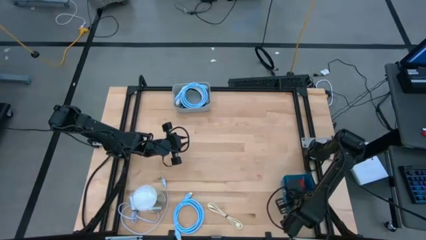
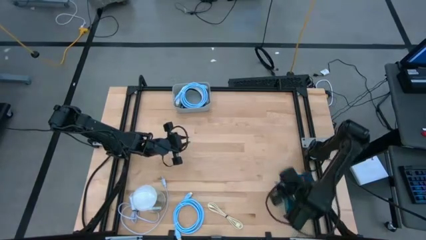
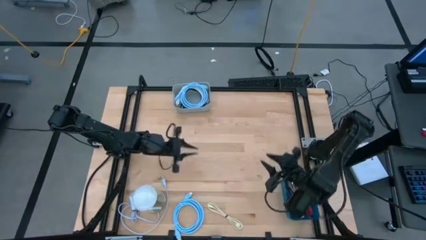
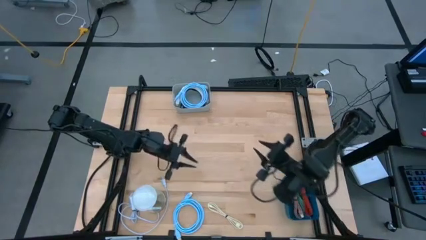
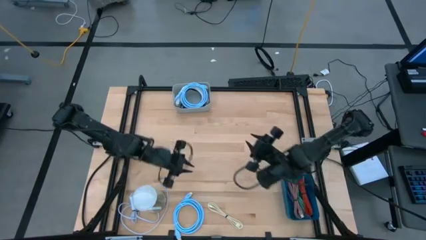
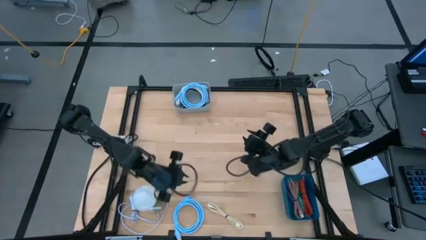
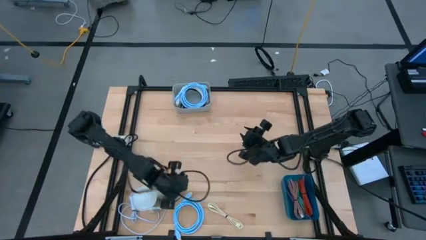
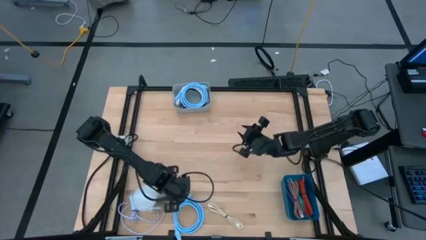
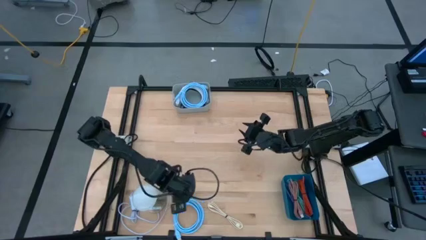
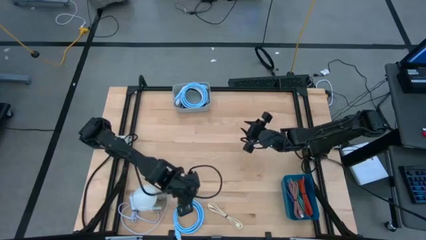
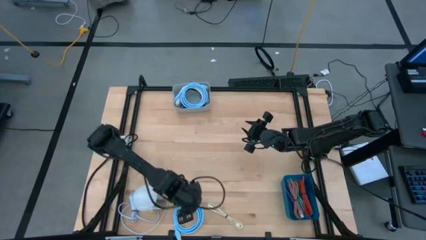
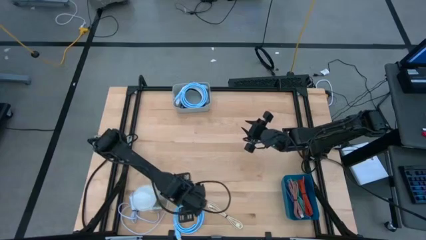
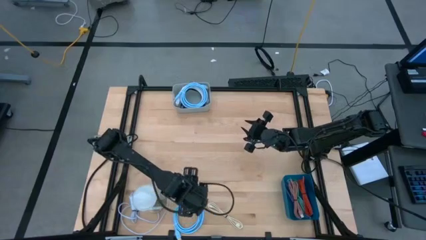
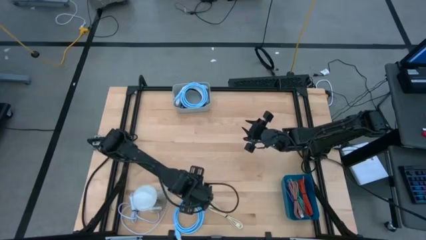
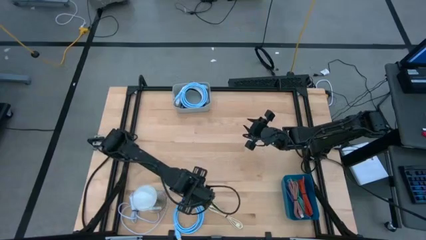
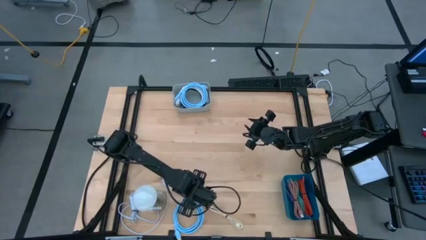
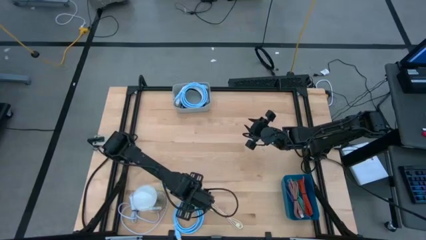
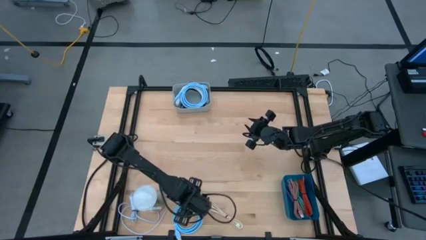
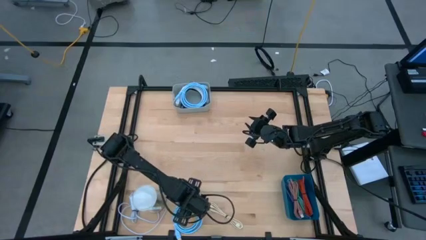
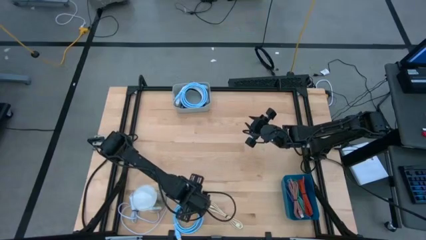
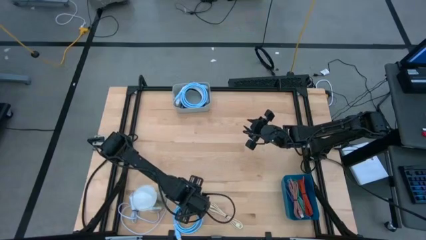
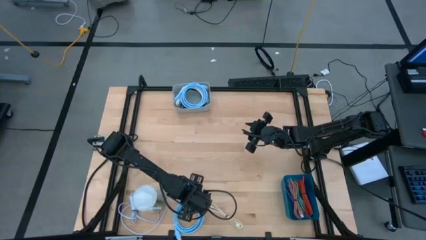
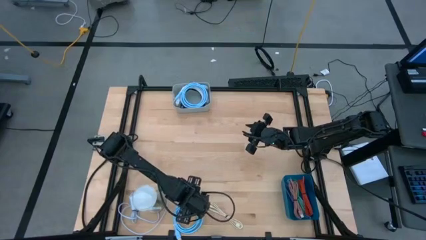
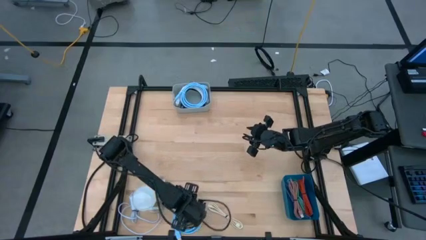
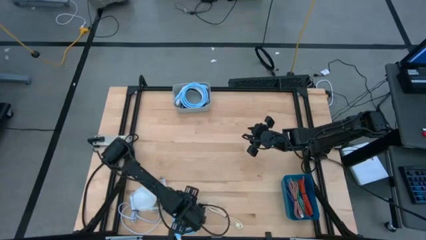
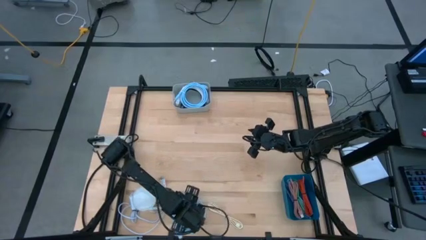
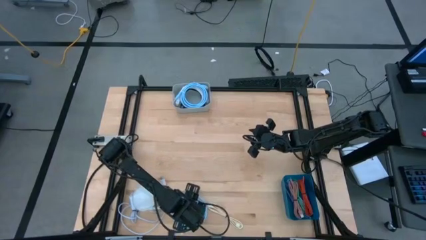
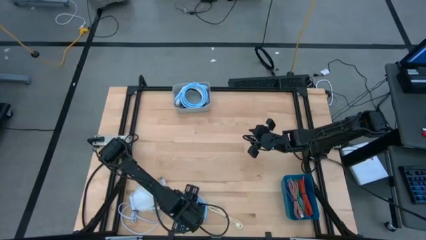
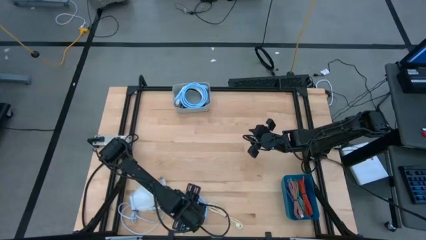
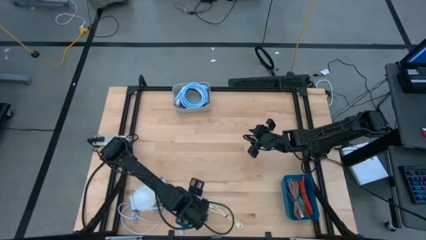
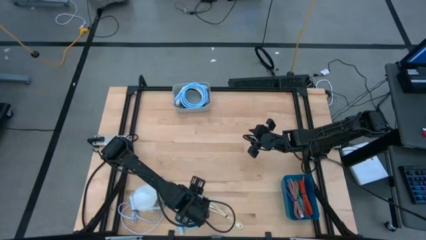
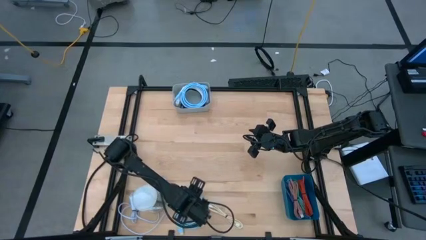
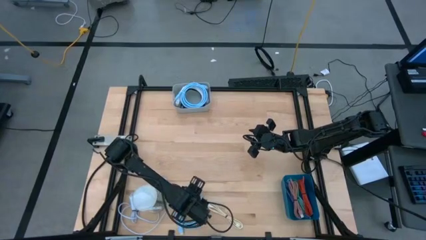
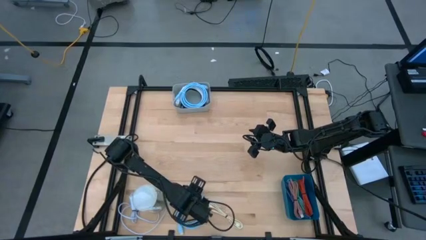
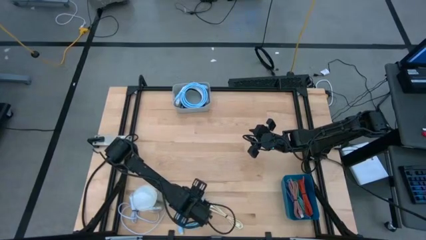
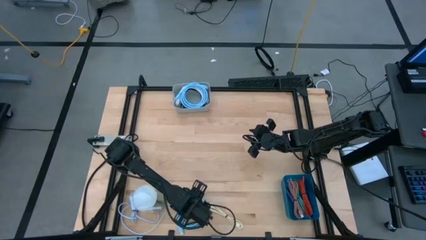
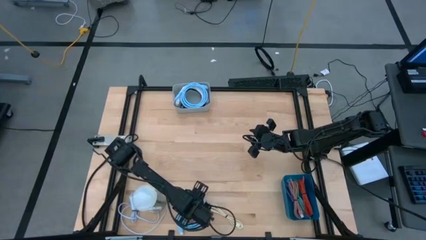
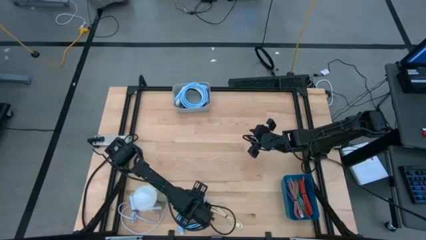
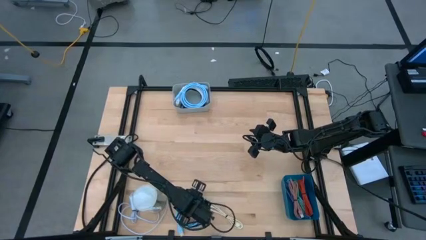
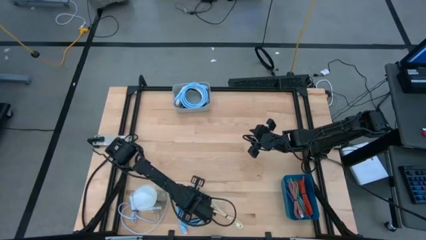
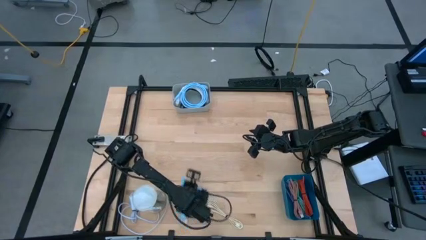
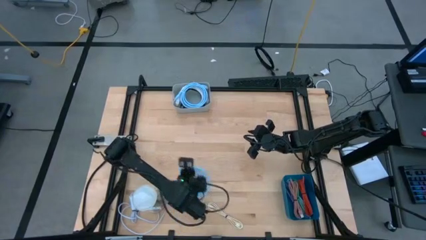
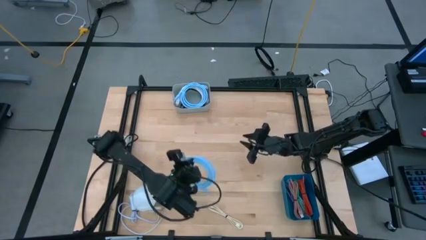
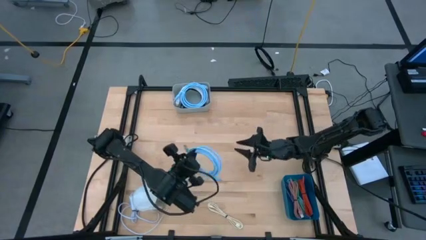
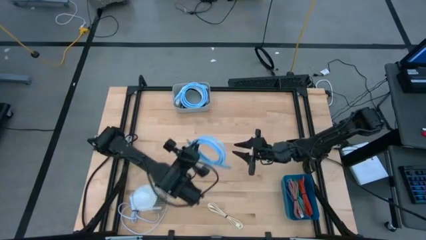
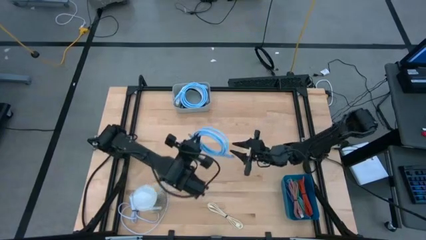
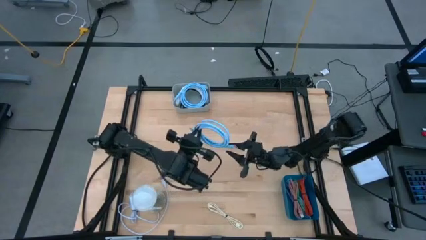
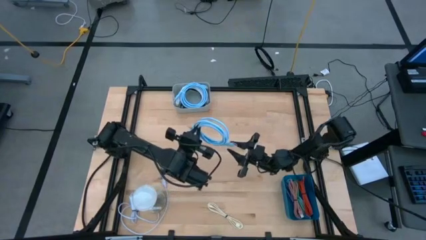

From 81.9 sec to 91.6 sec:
Task: Pick & Place USB Port
Put the blue HDMI cable into the gray bin

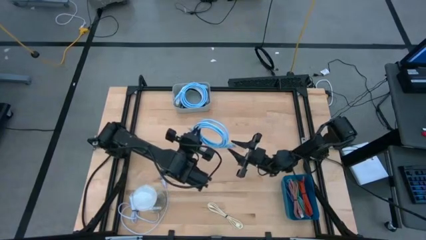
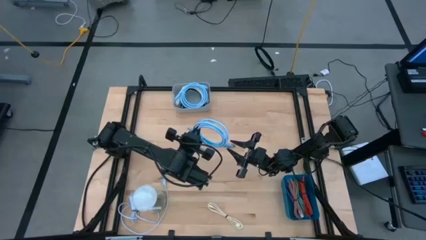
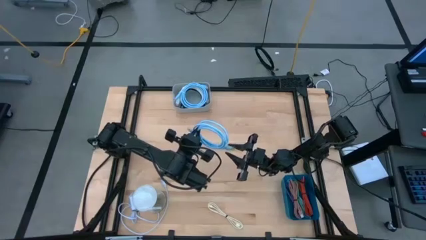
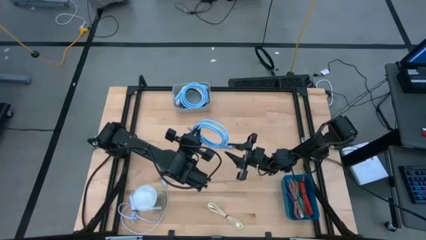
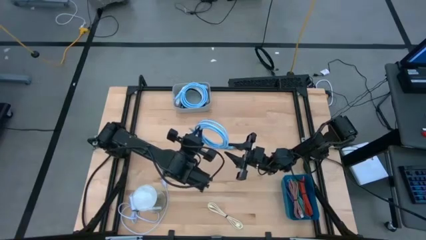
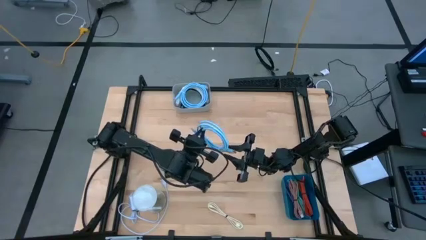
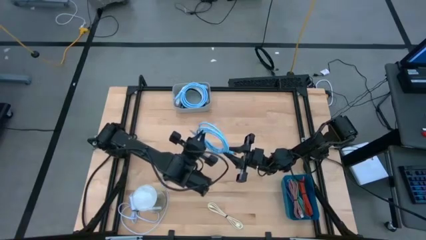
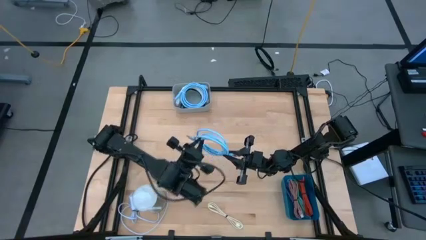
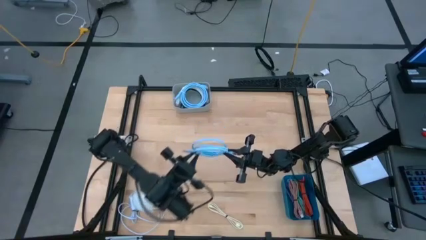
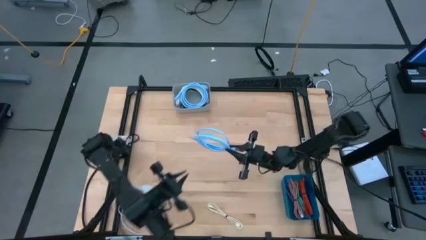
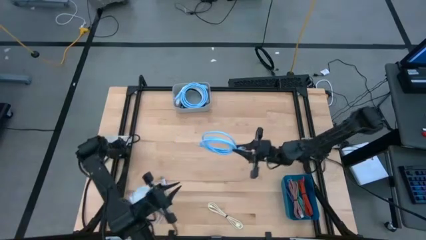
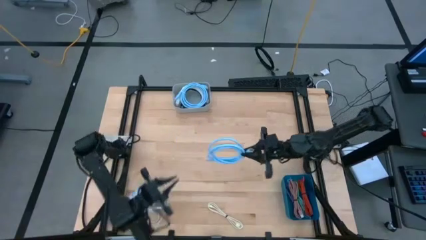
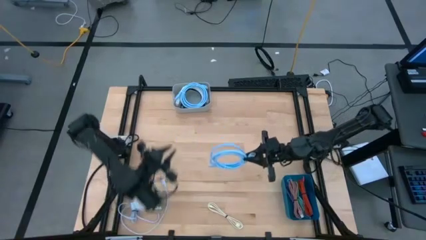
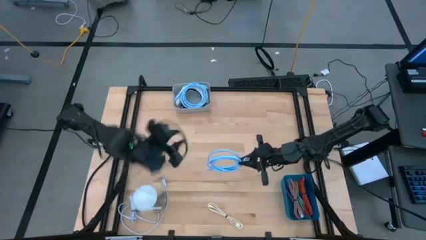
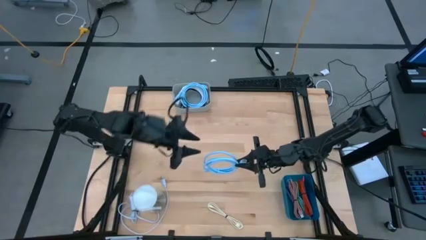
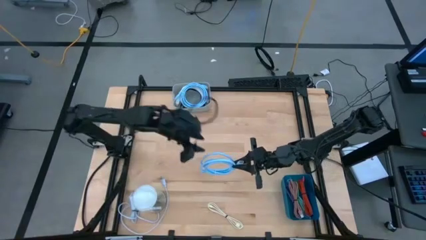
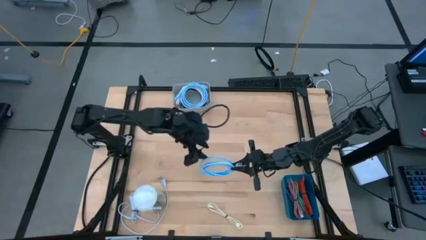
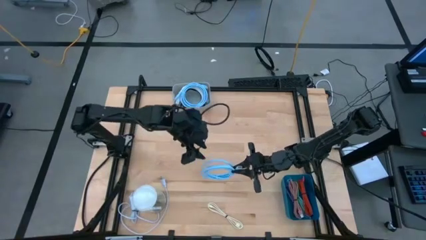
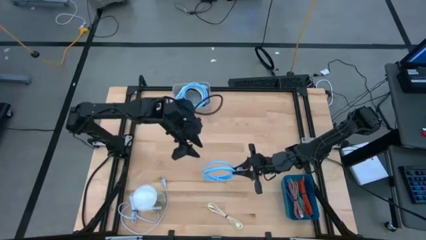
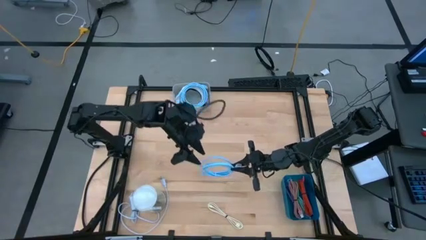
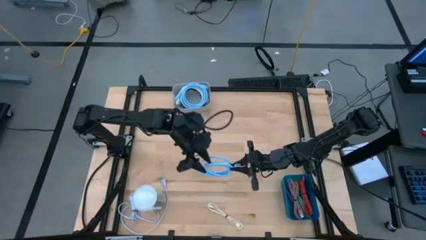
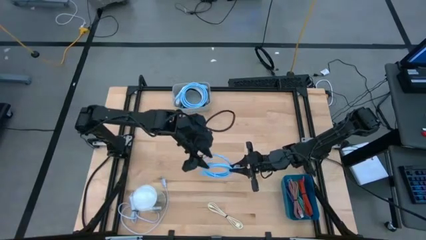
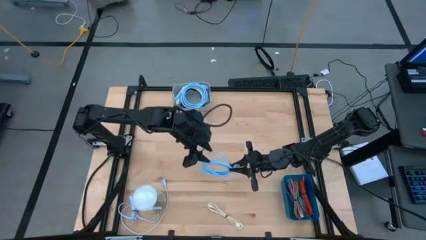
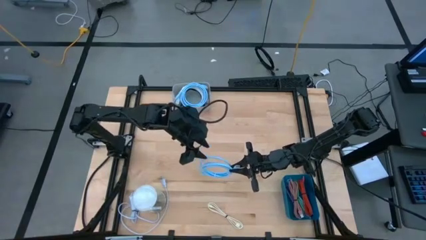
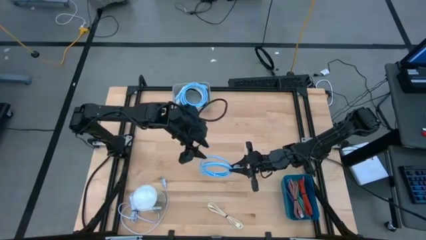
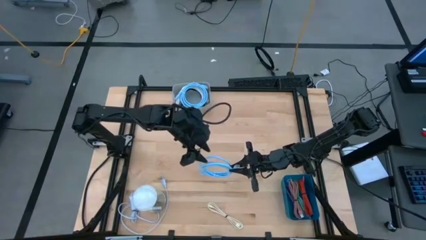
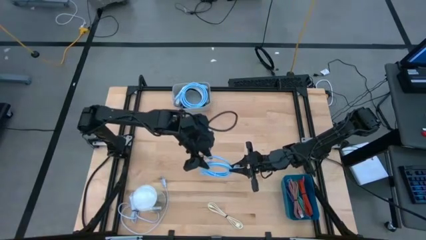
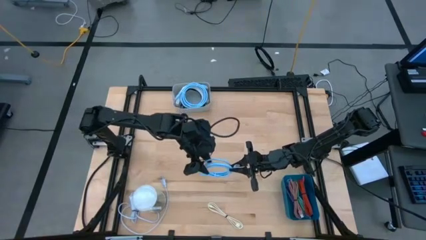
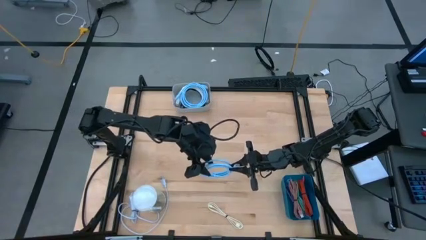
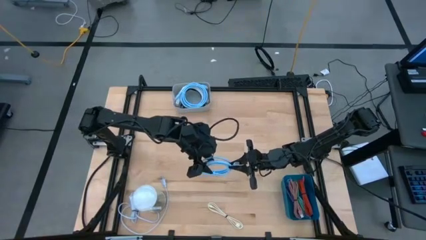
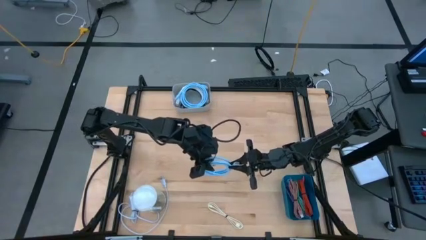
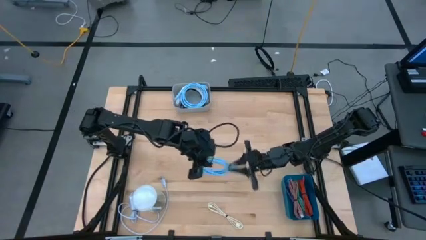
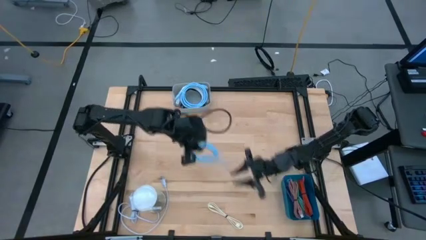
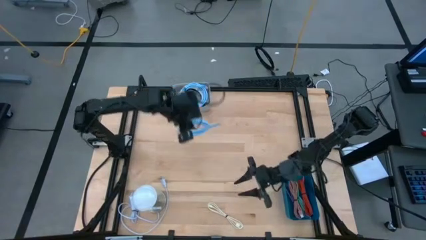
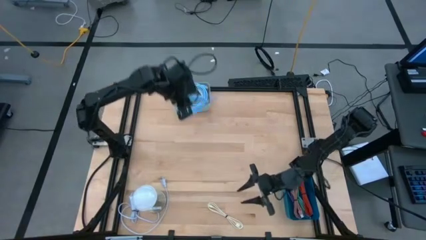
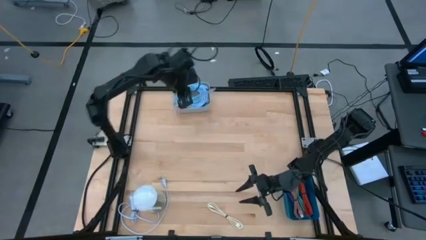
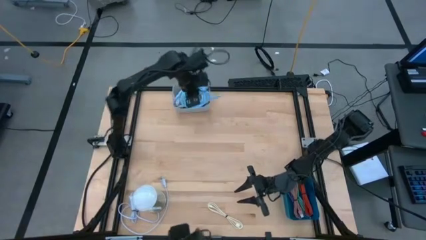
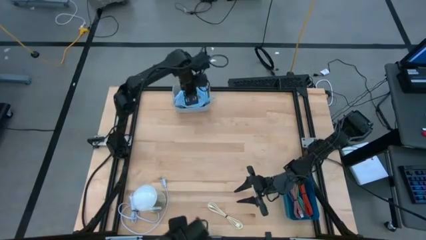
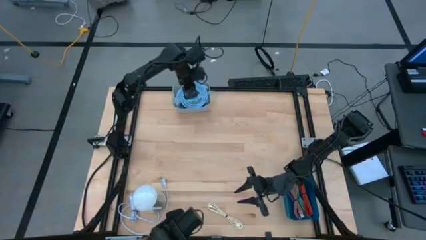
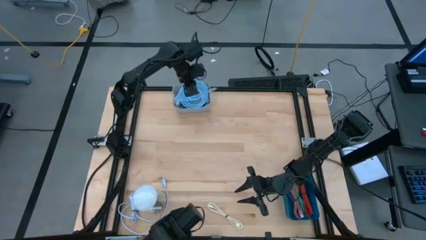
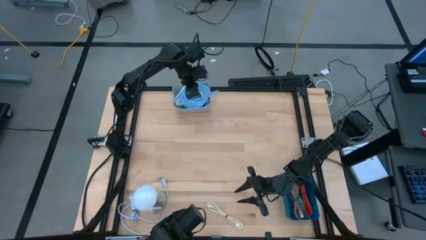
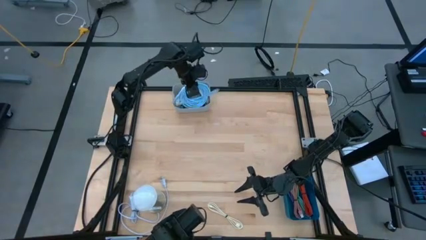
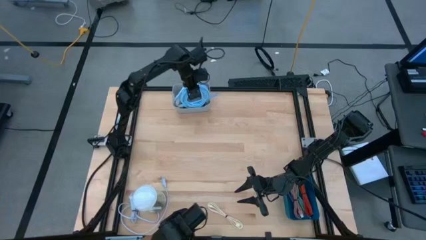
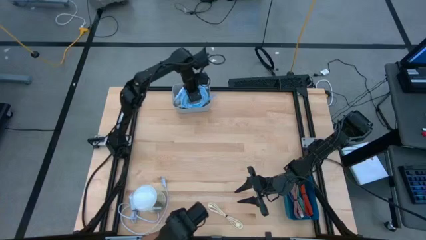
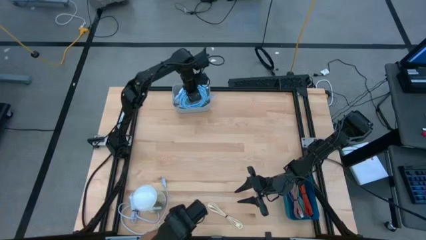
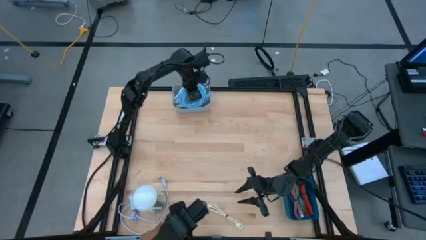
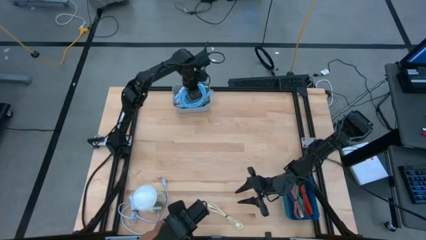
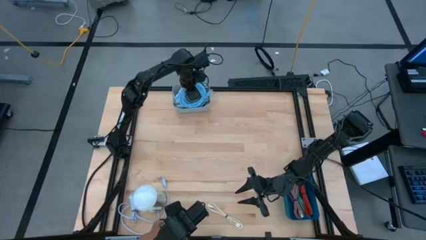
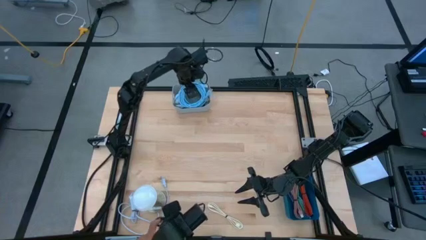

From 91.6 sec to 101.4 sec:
Put the blue HDMI cable into the gray bin
